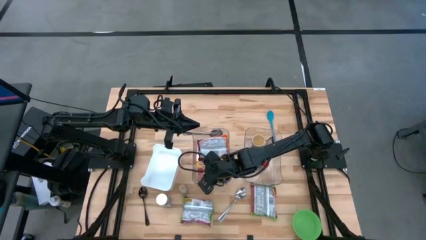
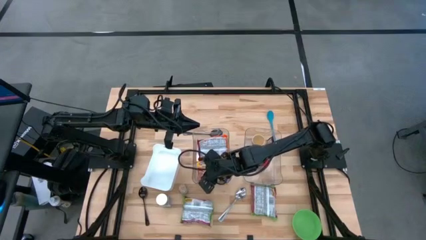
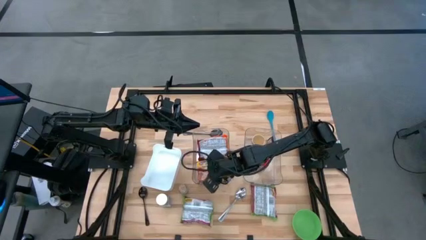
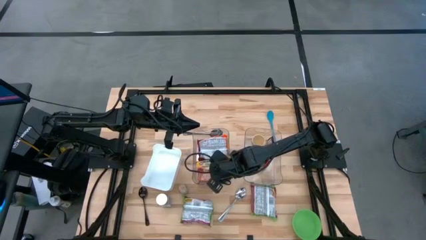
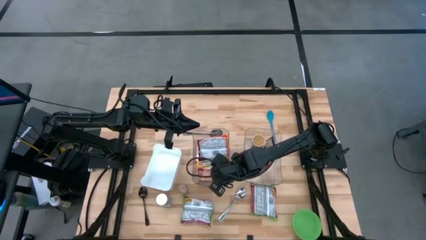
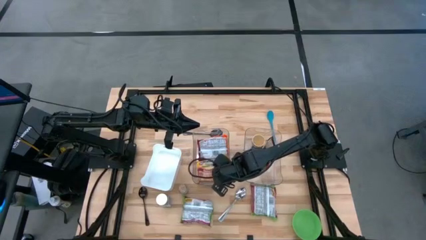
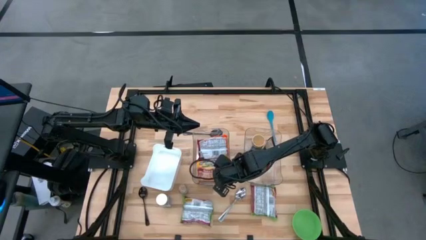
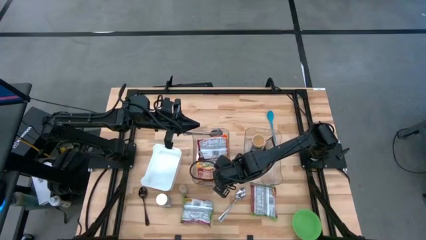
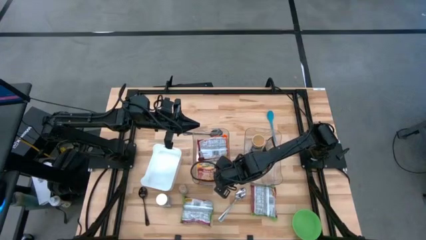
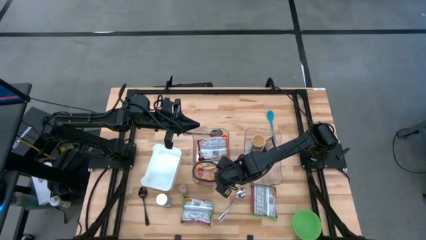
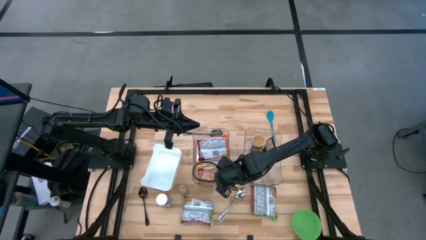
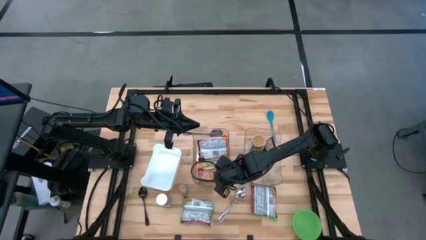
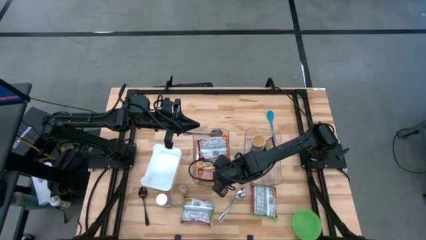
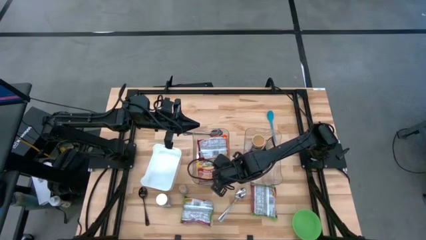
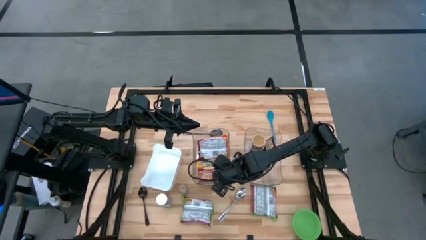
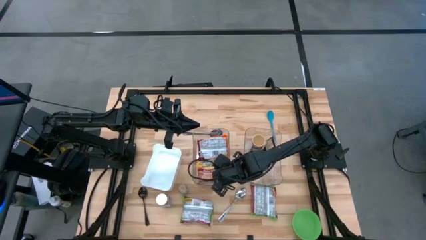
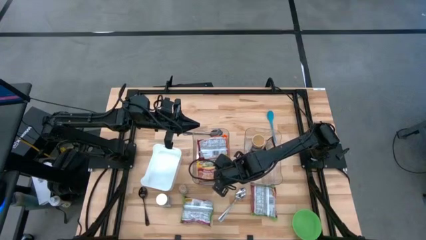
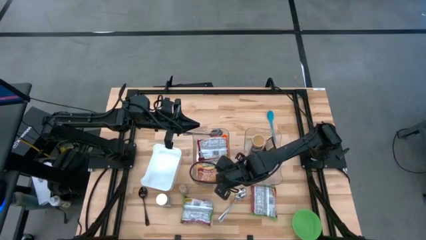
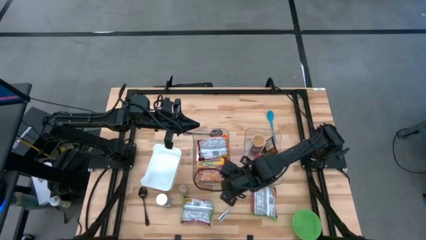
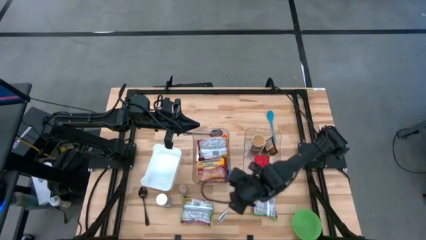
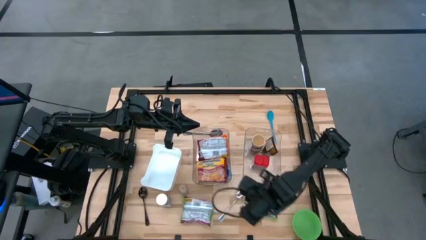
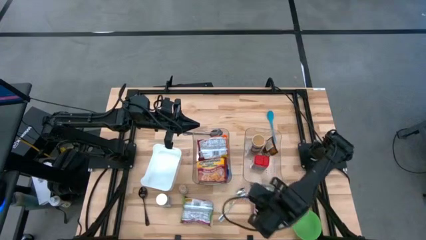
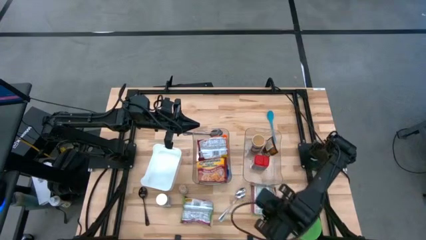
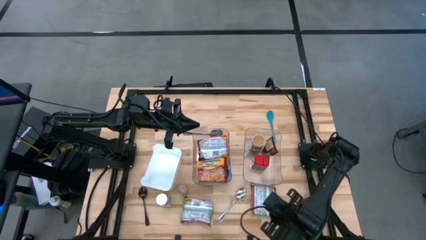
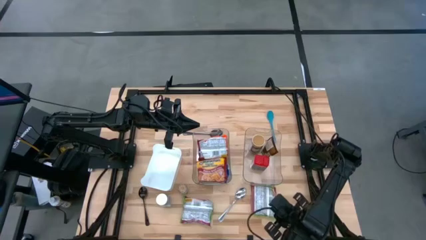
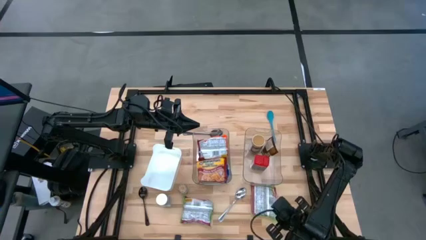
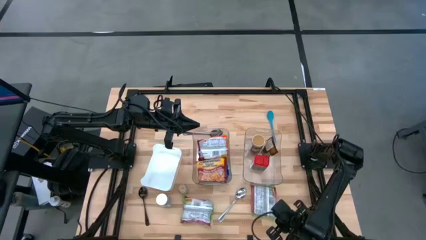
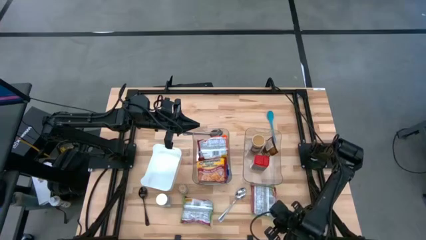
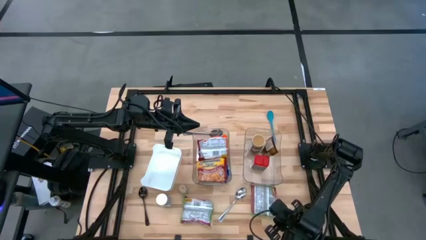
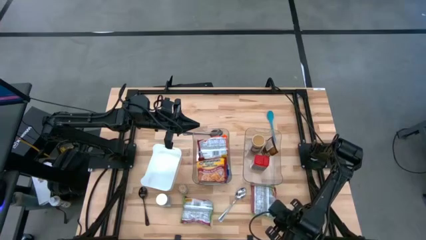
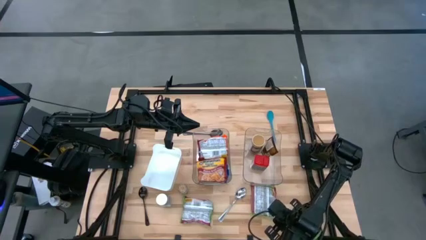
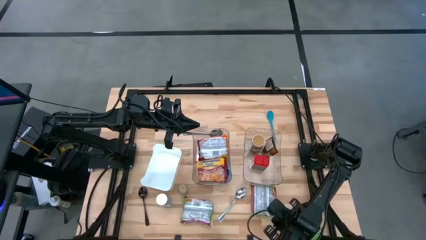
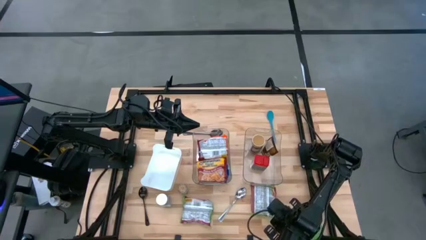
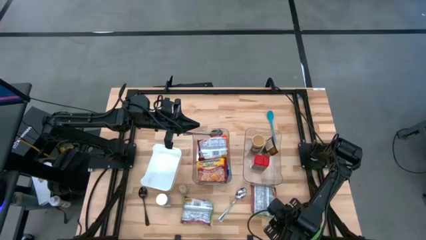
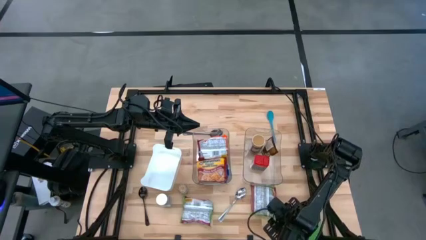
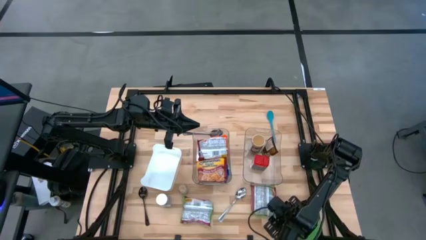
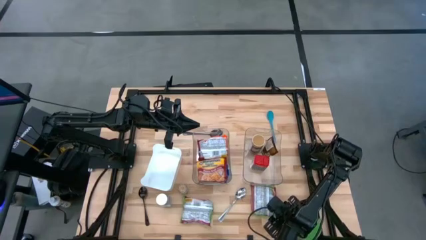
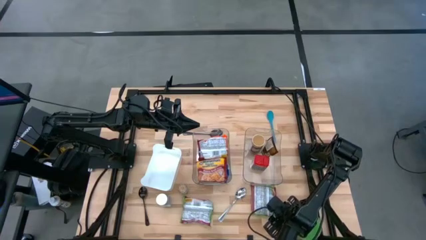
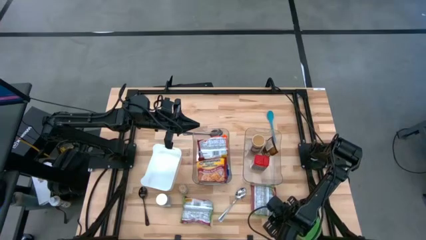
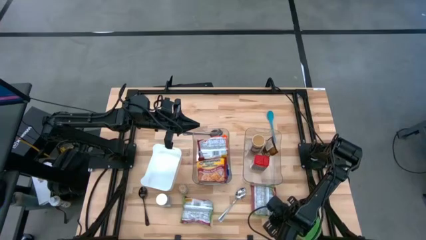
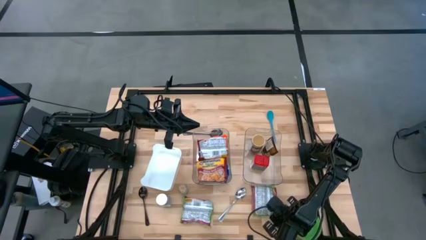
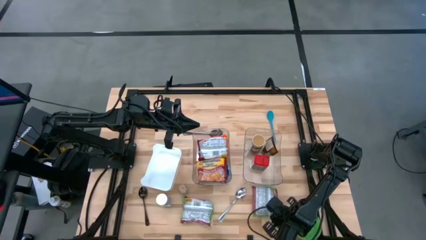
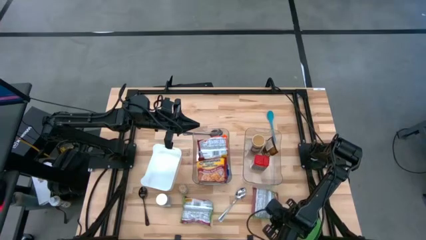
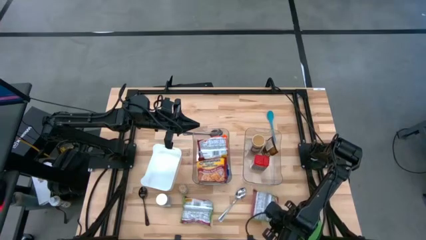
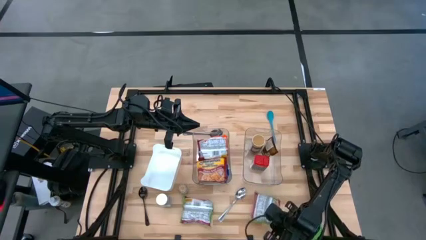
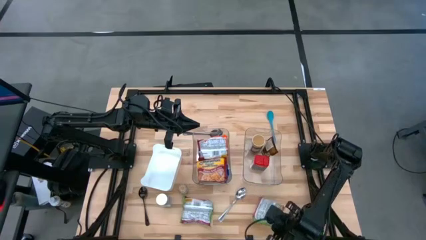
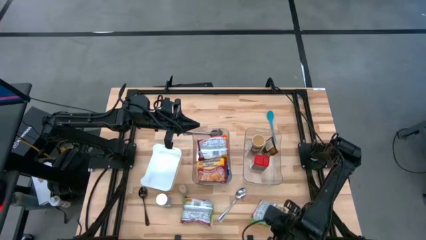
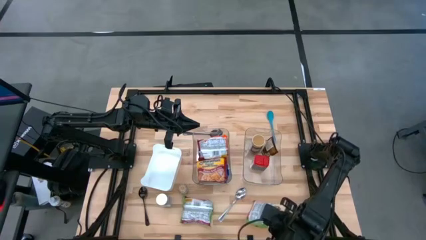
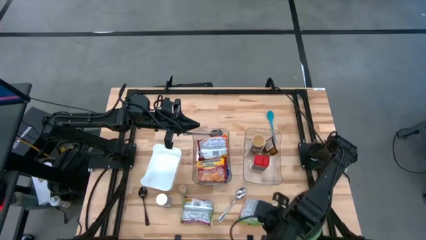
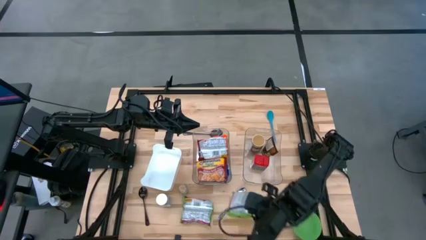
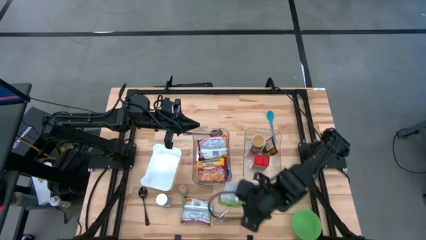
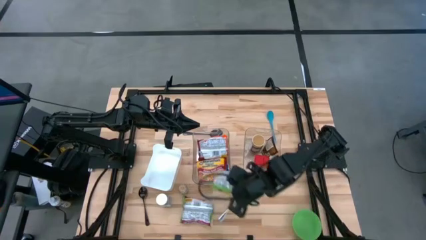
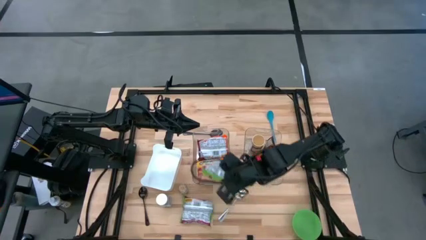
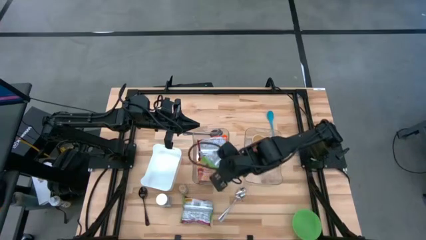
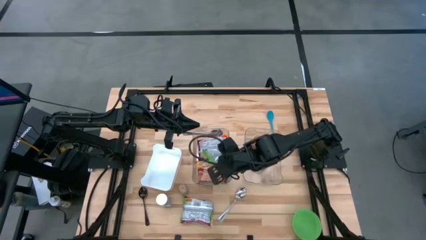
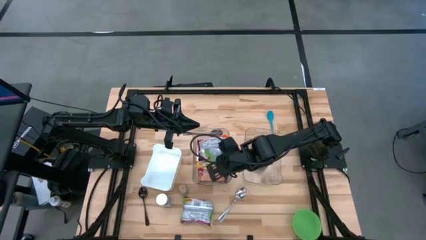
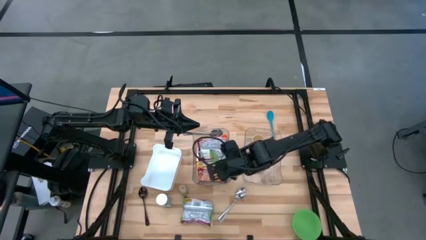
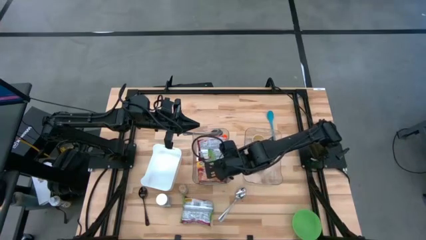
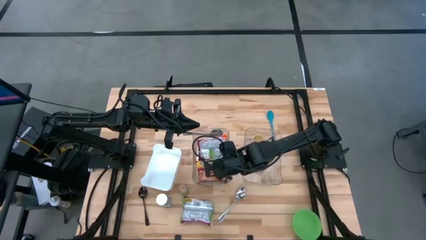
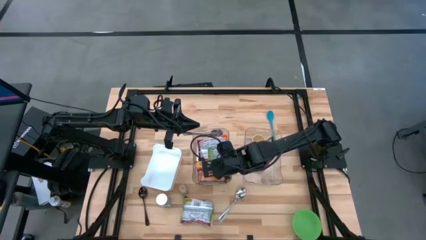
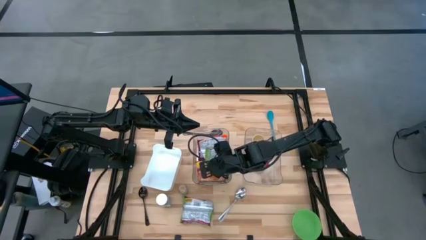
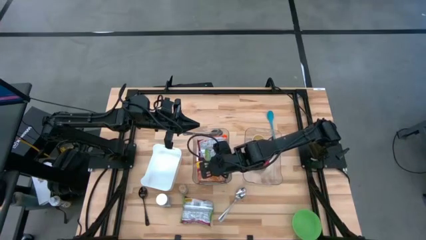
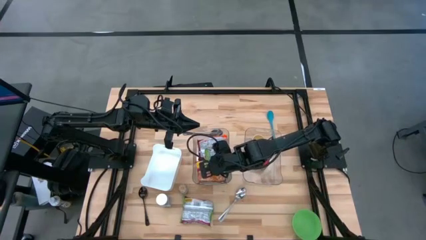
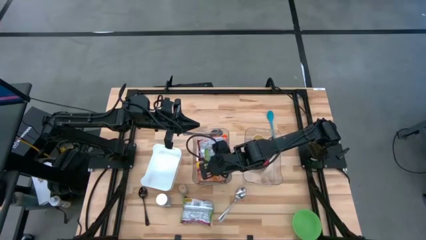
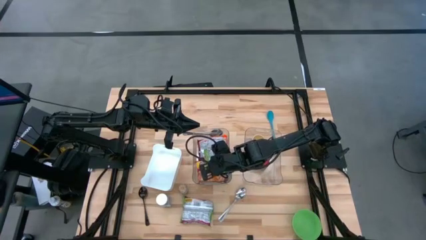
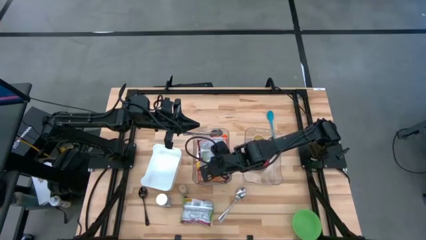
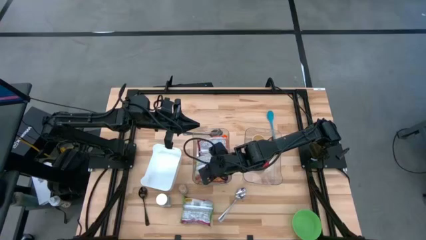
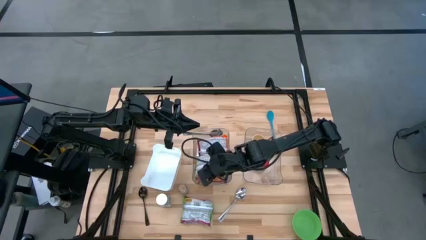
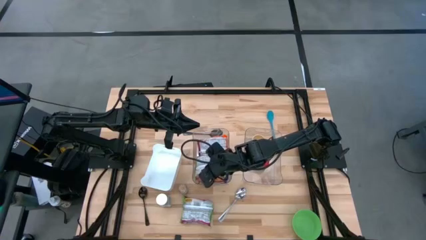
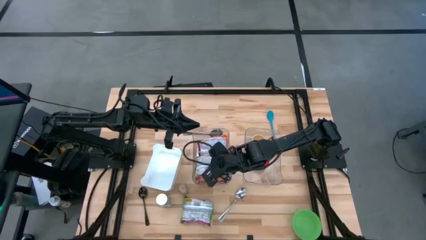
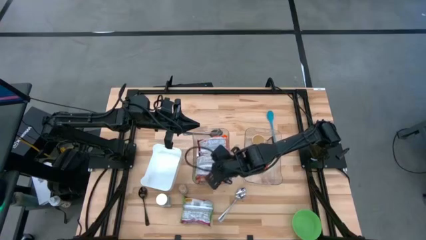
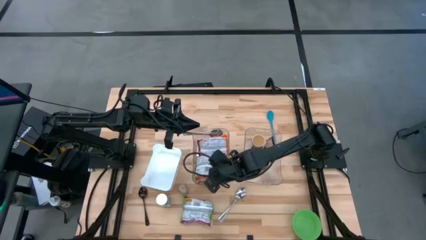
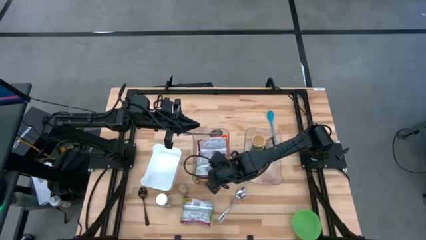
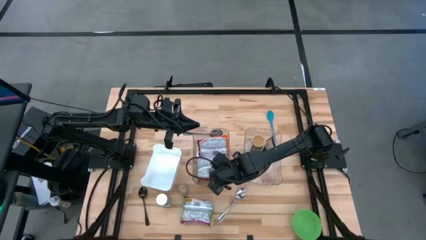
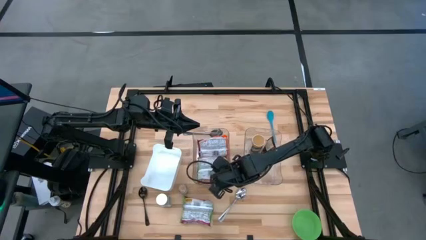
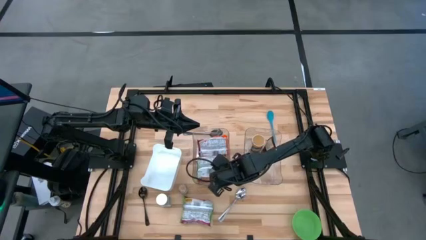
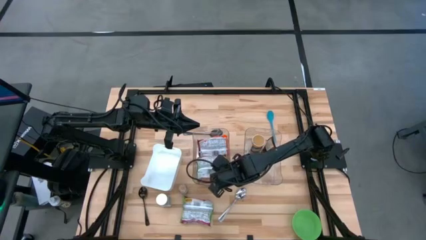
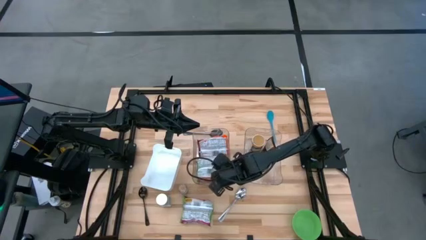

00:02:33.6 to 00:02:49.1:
Task: Pick & Place Food Item
Put the right green noodle pack into the left transparent bin
